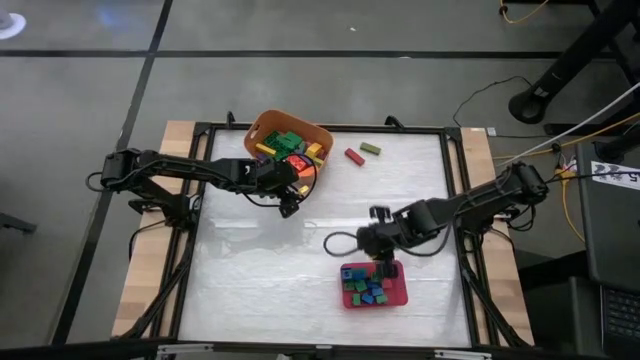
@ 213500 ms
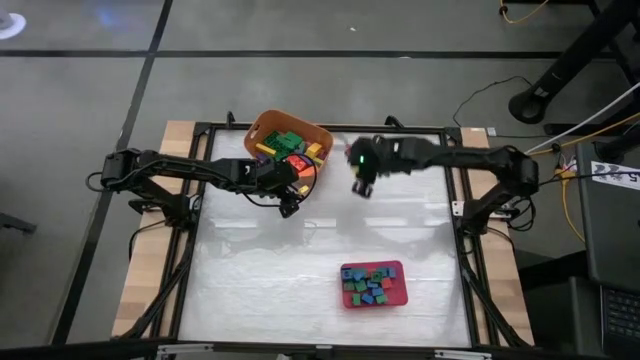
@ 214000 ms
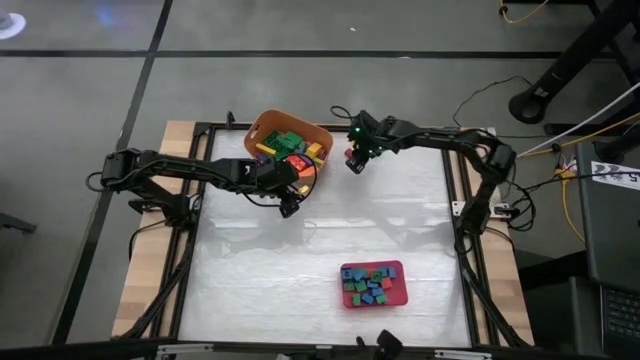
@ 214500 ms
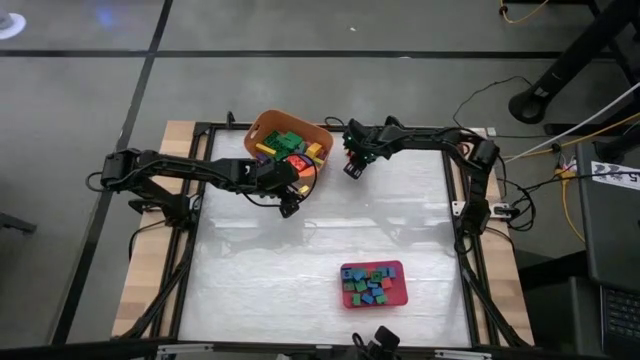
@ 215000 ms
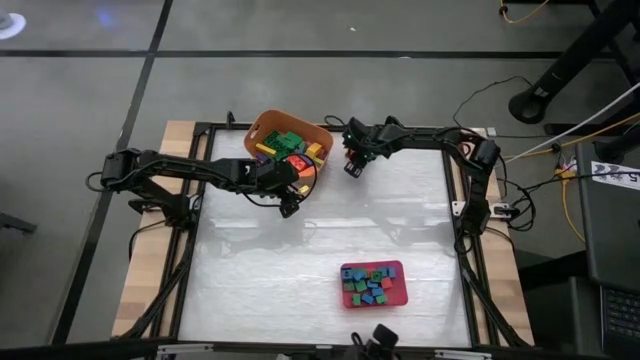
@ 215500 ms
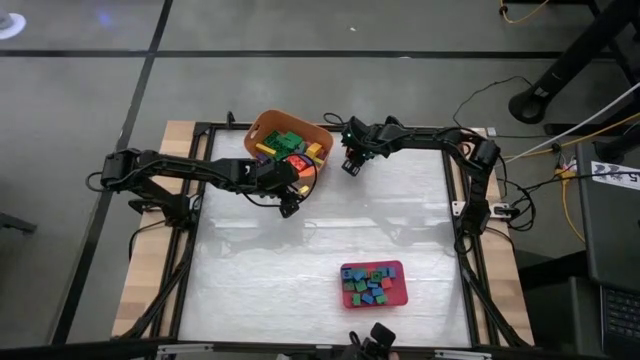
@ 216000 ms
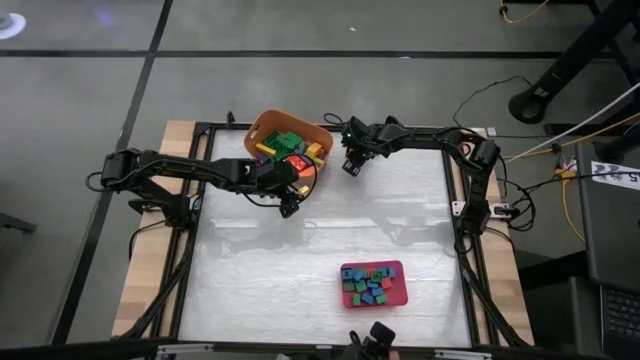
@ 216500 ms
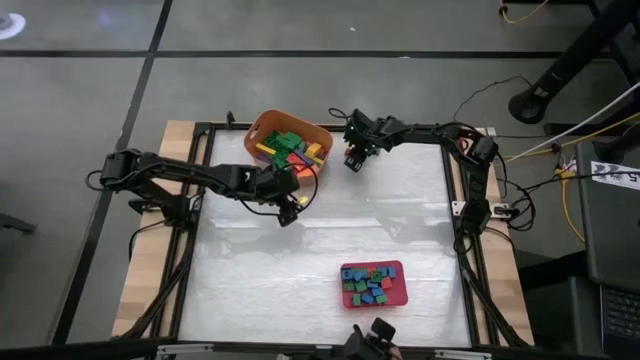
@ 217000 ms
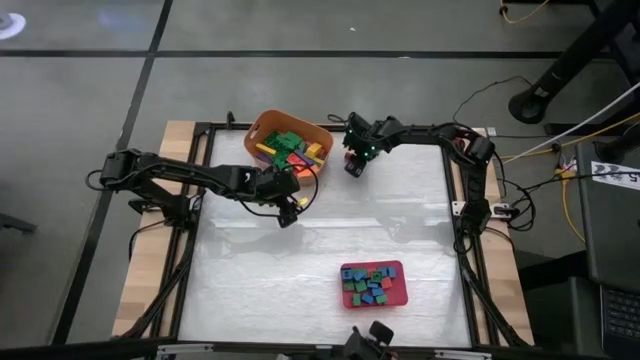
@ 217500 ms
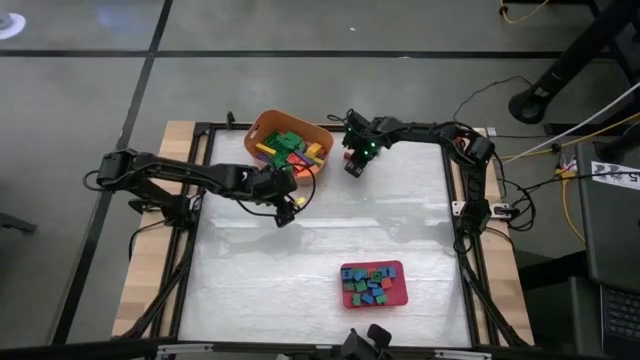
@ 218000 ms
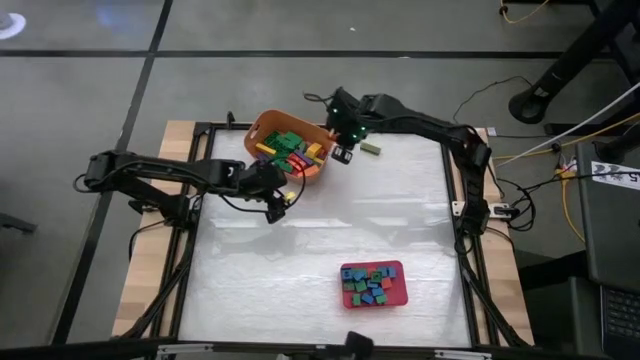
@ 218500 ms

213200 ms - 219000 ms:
Task: Sort blocks by size
Put the large red block into the orange bin

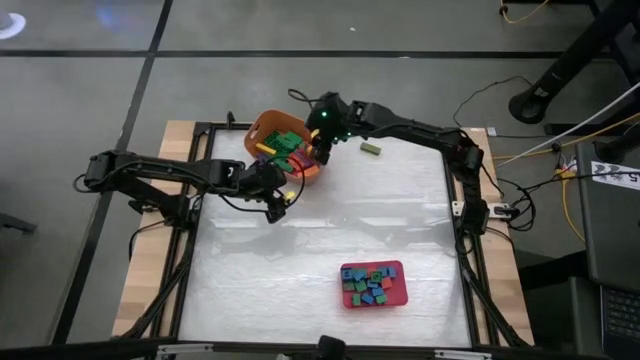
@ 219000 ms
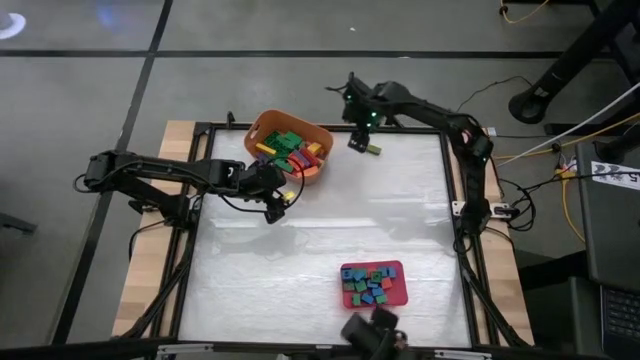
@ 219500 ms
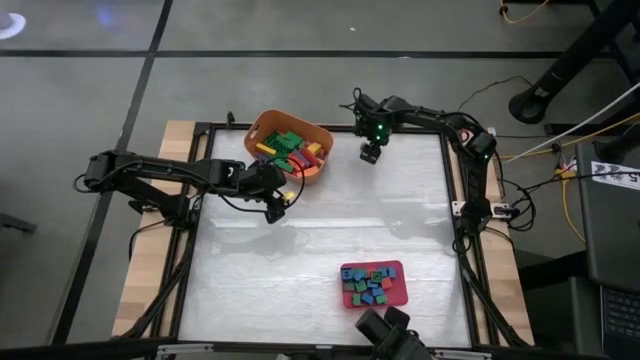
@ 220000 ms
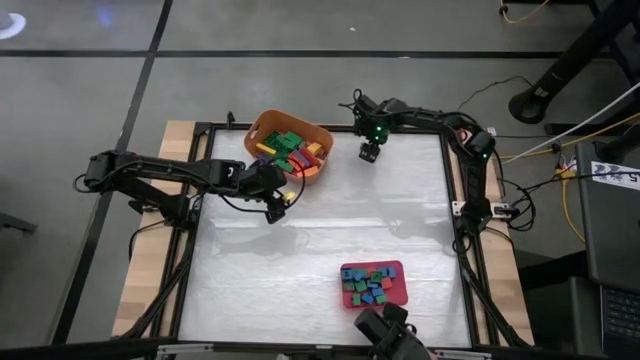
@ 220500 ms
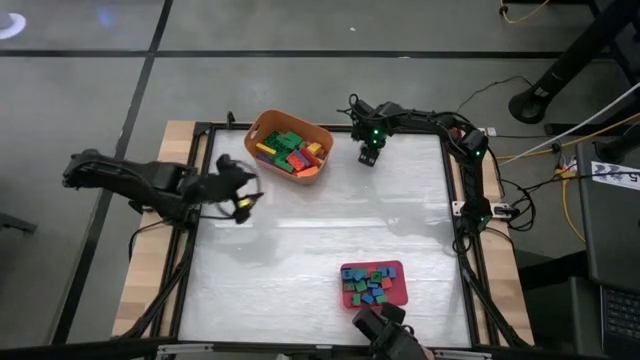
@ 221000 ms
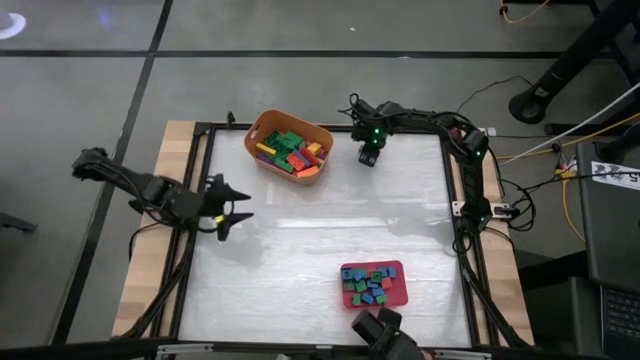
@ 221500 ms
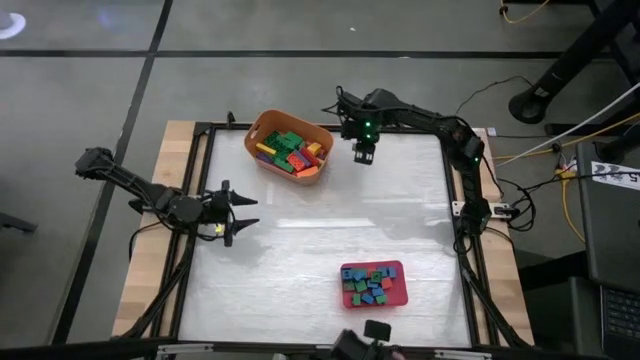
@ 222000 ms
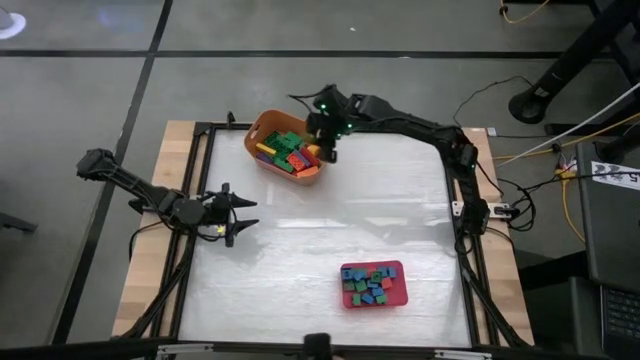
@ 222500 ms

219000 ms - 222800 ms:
Put the large light green block into the orange bin

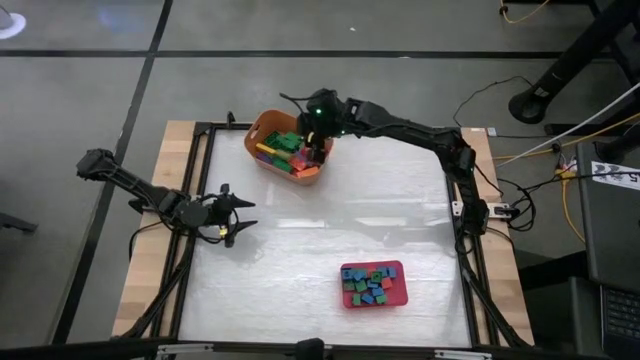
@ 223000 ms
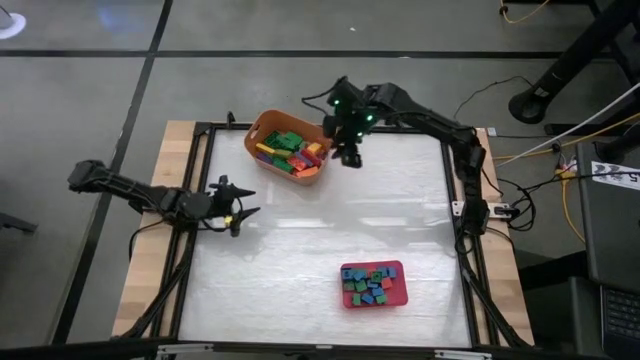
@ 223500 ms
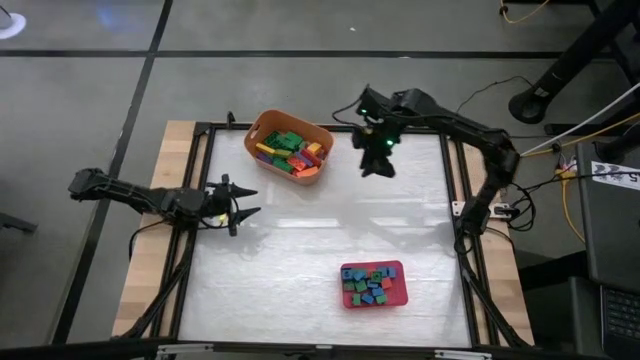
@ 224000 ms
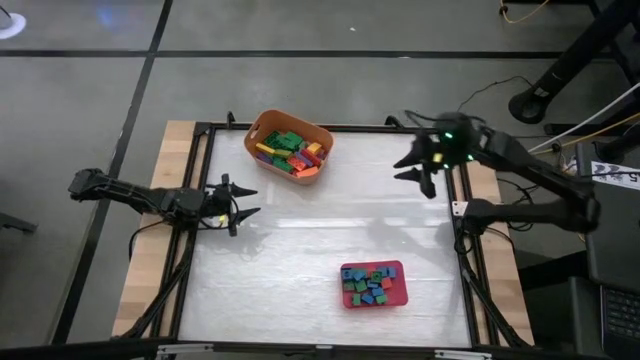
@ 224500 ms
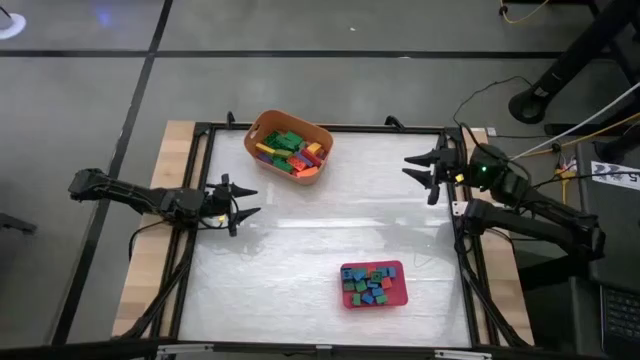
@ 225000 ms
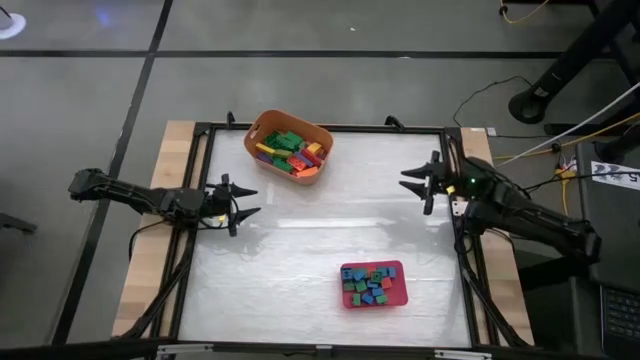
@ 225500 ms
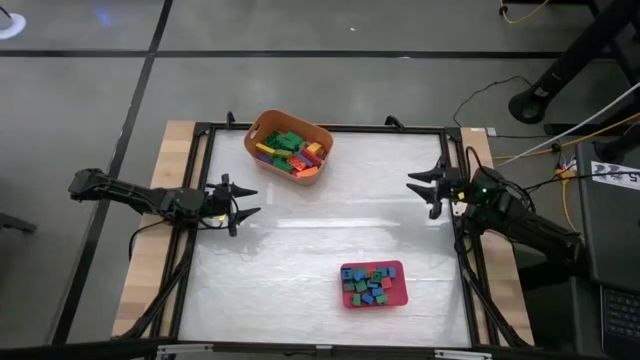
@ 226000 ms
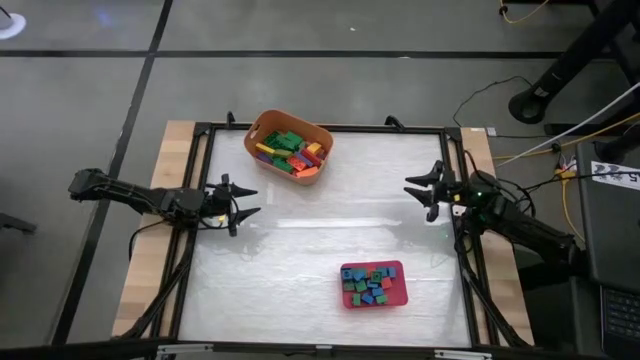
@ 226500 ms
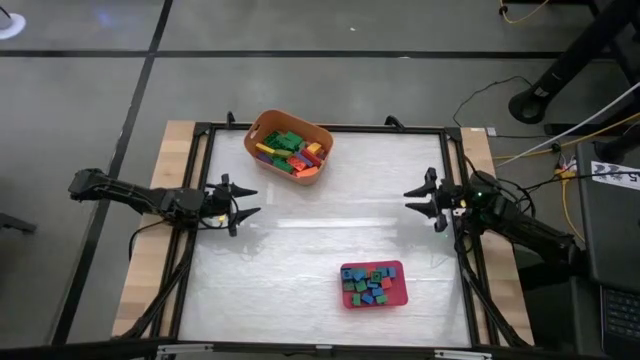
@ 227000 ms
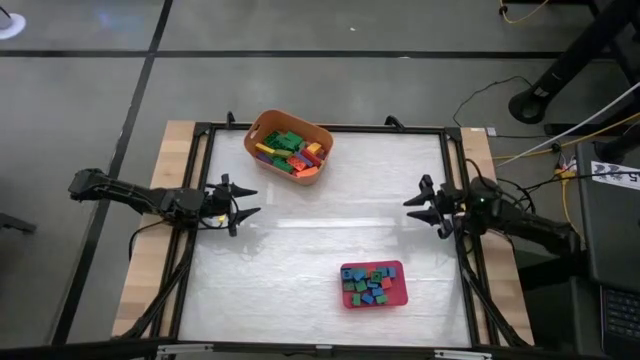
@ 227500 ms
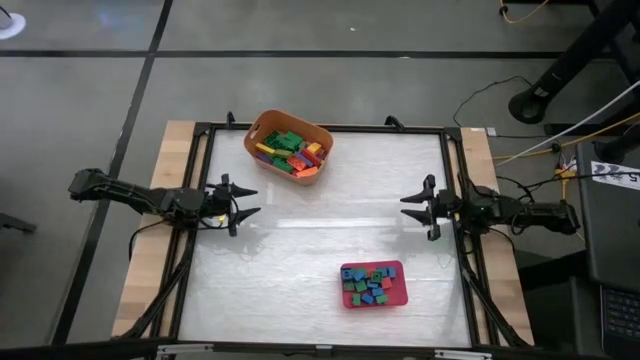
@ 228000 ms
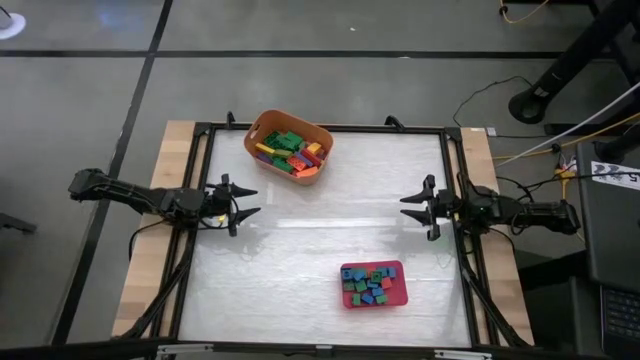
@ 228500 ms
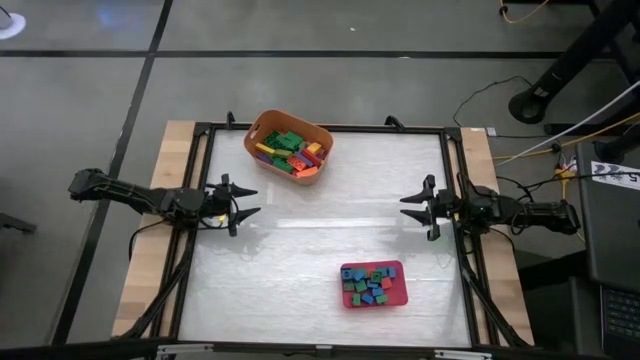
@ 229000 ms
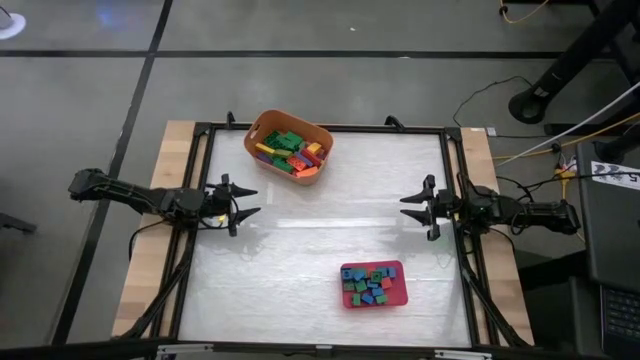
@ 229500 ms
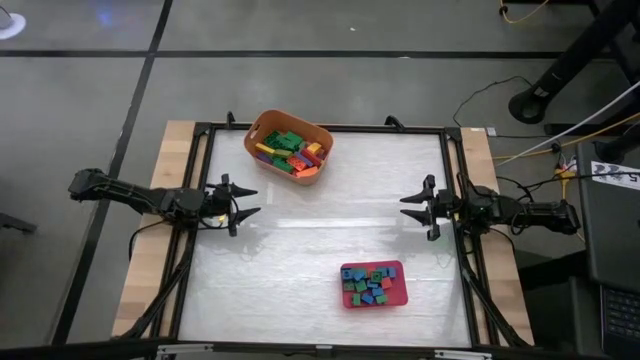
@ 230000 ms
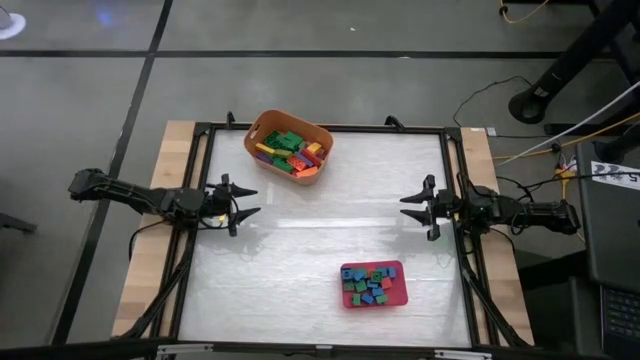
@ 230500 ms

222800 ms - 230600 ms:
Return to Home Position

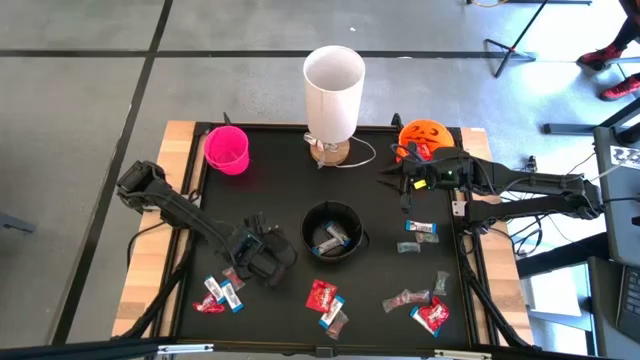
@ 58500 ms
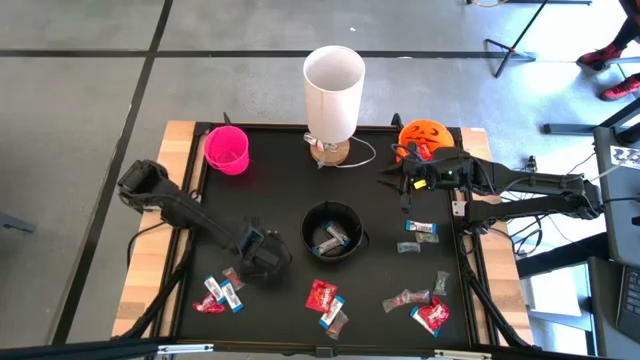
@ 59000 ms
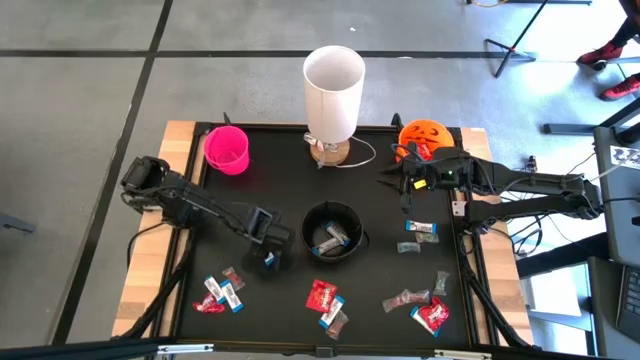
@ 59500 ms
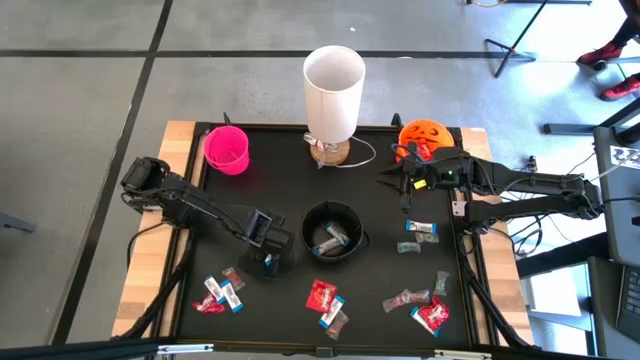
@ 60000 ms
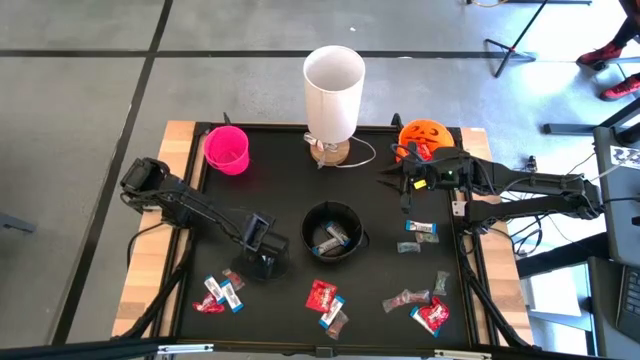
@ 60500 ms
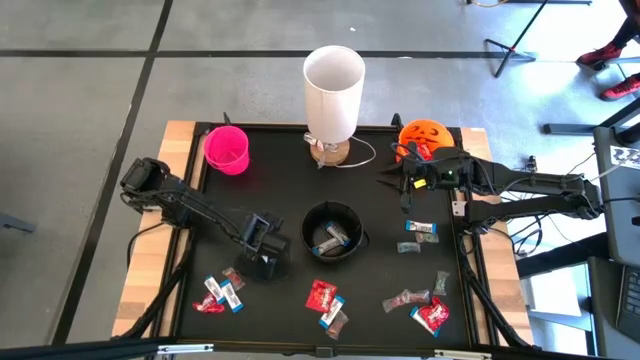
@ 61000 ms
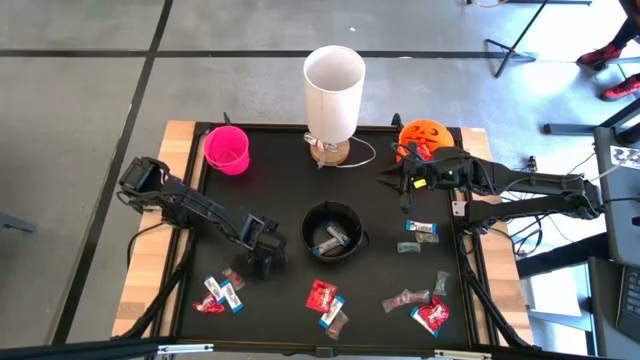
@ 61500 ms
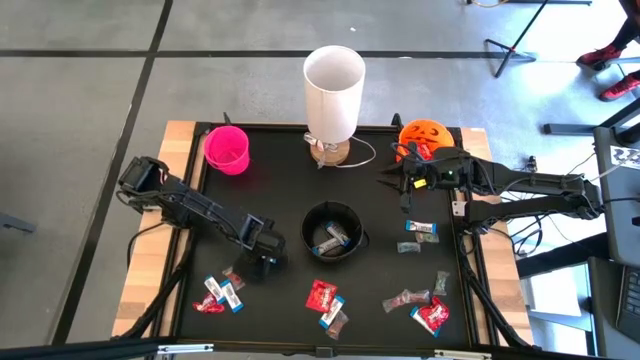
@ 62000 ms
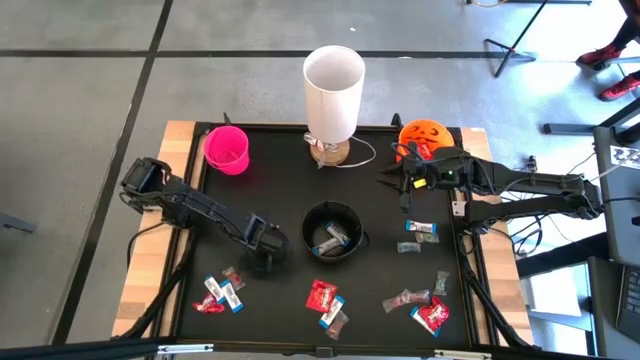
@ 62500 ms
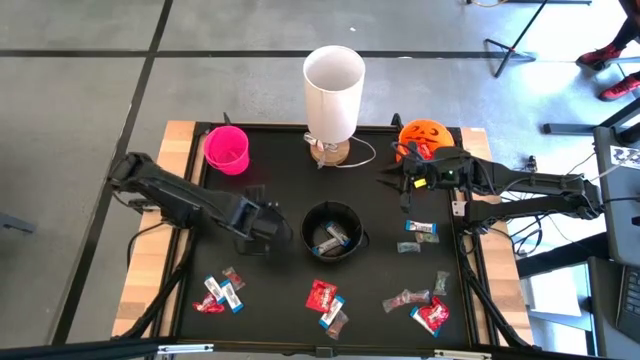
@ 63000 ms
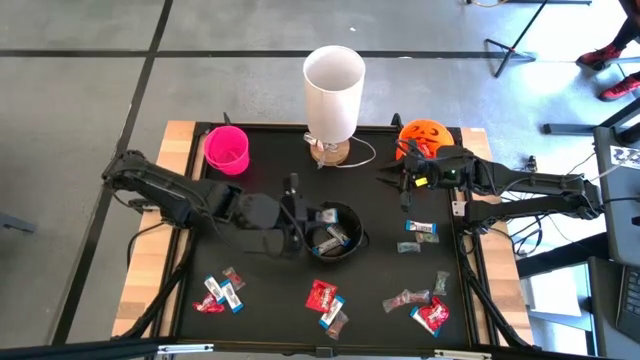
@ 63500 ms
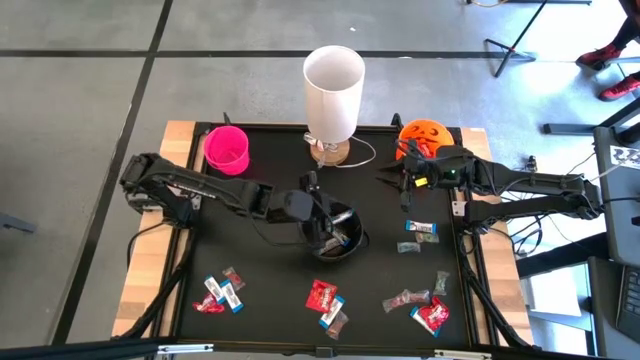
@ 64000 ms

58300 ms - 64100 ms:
Task: Sort candy
Put the white chocolate into the black bucket
